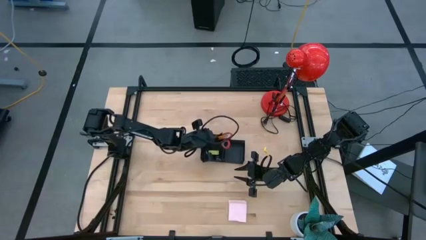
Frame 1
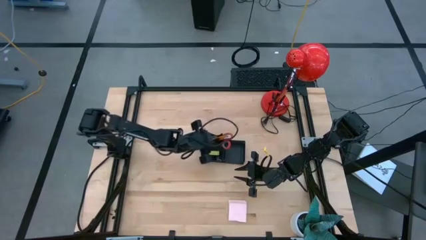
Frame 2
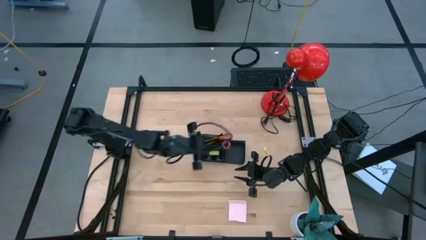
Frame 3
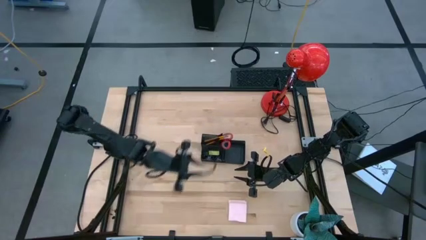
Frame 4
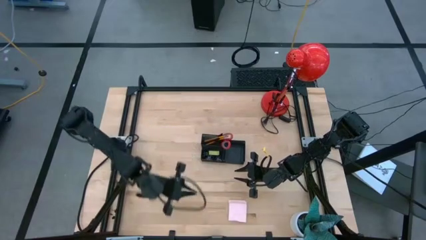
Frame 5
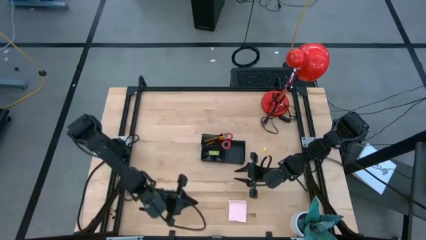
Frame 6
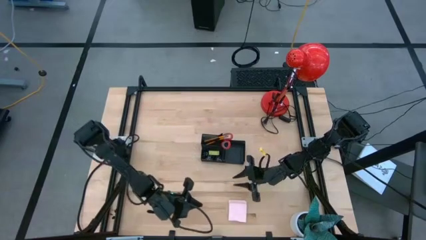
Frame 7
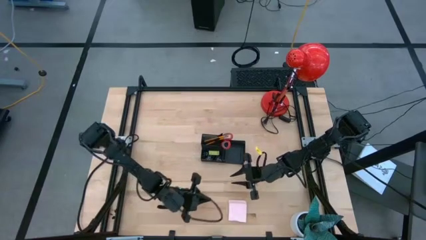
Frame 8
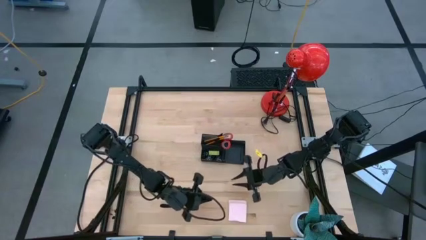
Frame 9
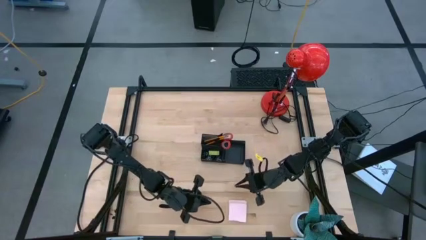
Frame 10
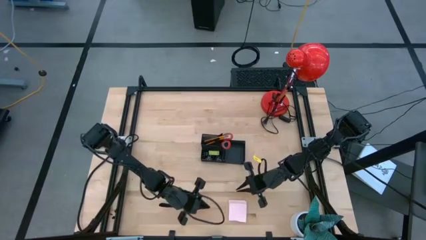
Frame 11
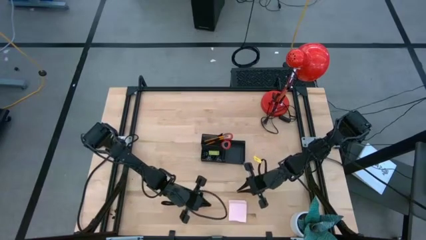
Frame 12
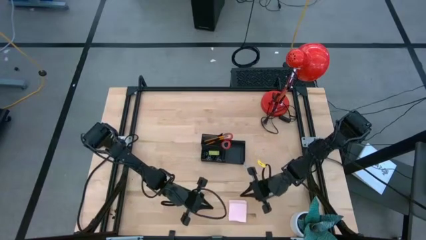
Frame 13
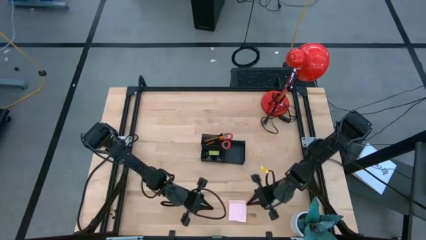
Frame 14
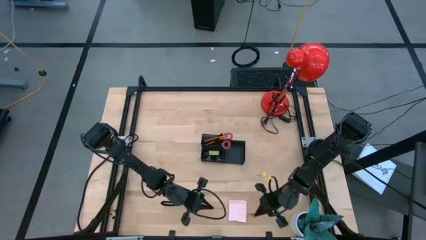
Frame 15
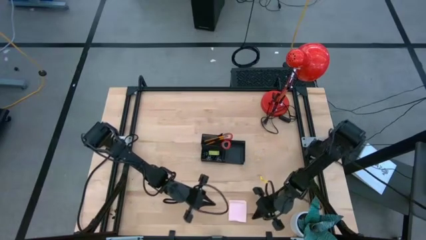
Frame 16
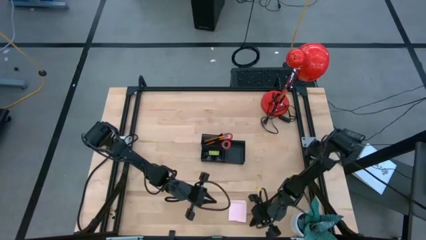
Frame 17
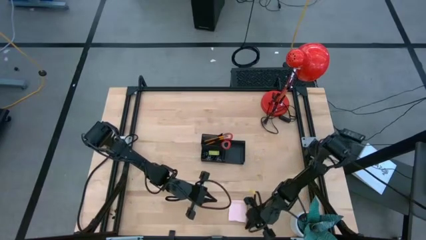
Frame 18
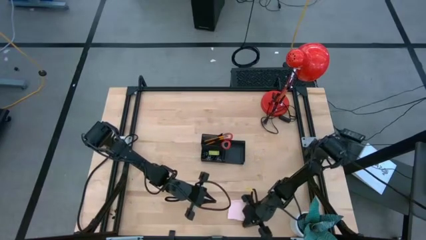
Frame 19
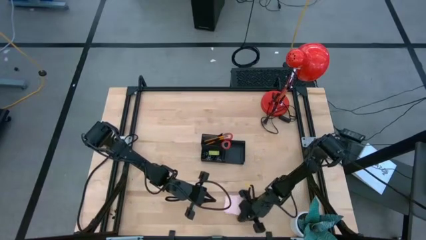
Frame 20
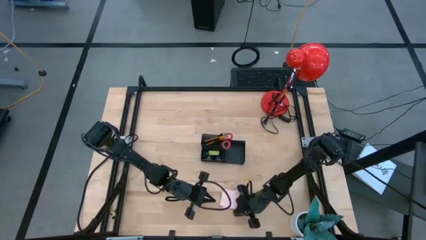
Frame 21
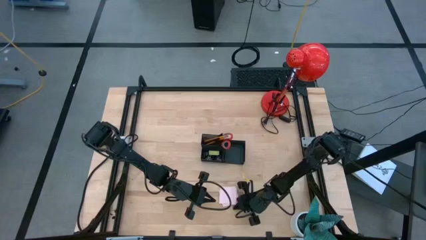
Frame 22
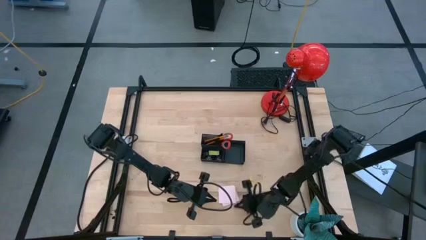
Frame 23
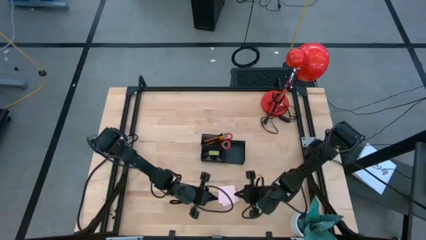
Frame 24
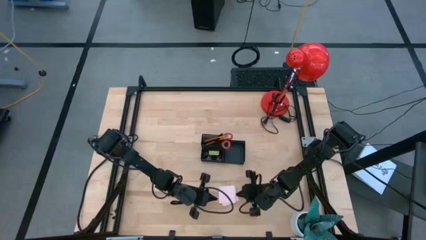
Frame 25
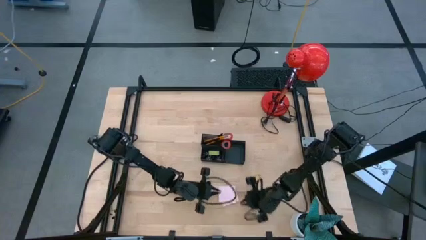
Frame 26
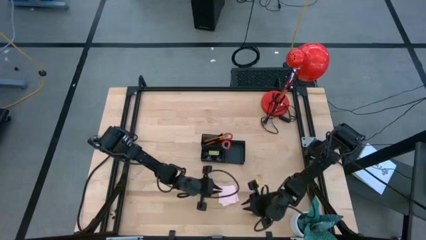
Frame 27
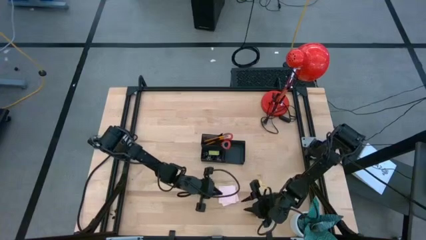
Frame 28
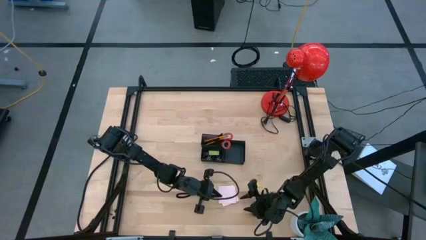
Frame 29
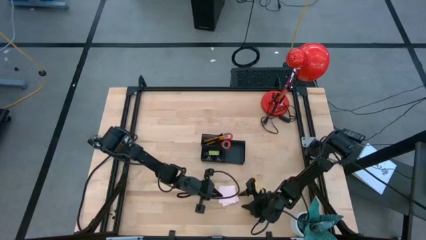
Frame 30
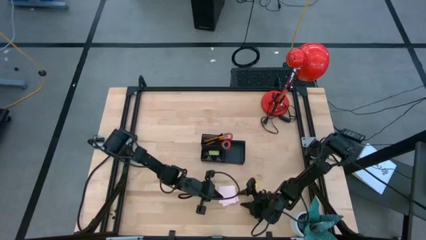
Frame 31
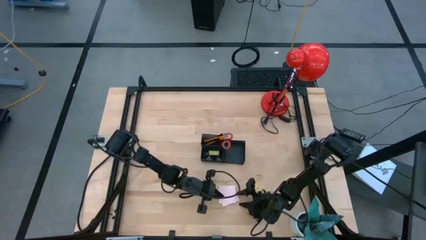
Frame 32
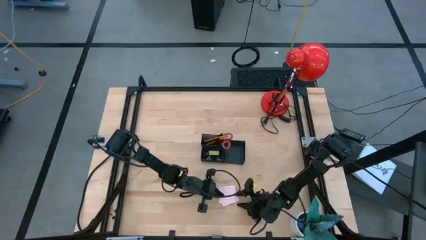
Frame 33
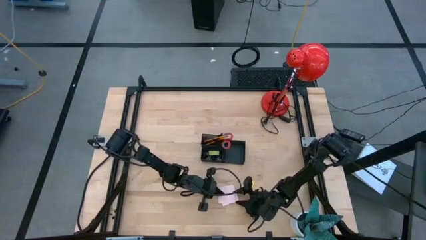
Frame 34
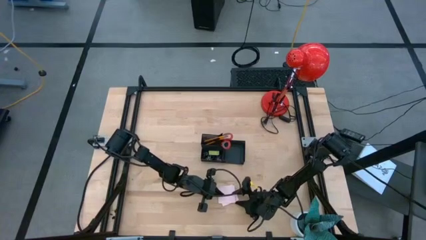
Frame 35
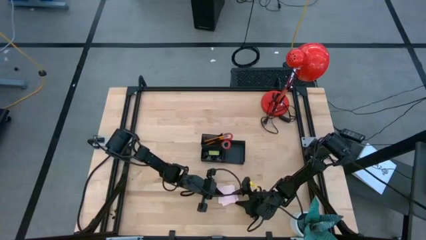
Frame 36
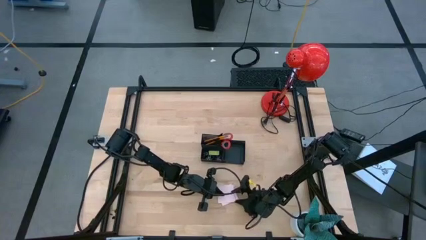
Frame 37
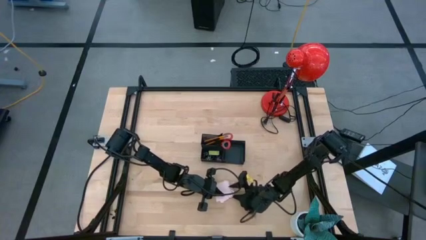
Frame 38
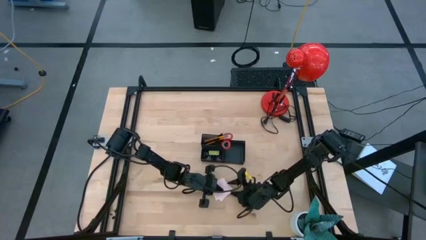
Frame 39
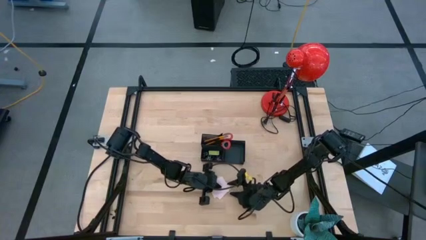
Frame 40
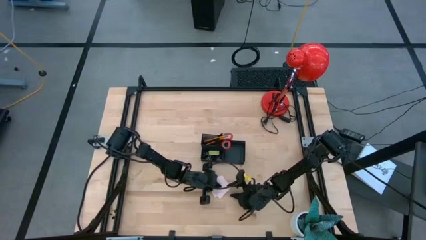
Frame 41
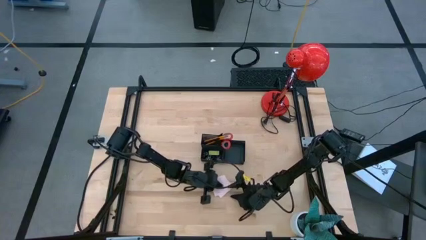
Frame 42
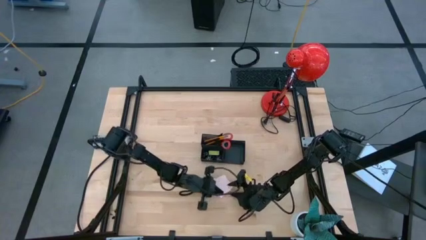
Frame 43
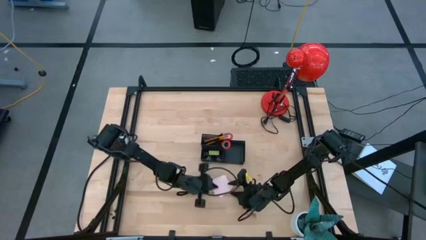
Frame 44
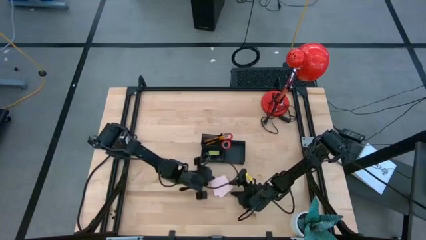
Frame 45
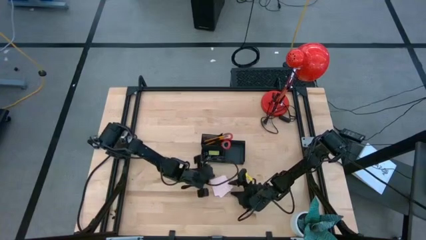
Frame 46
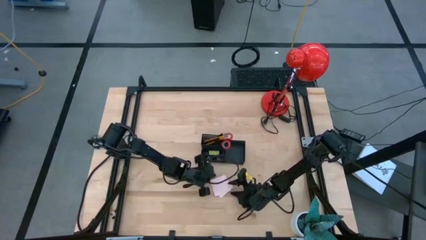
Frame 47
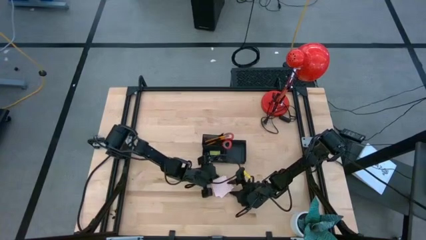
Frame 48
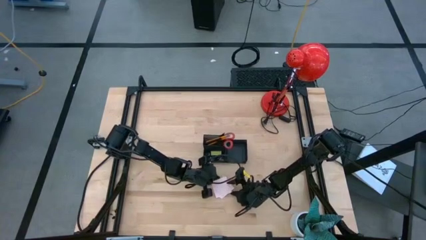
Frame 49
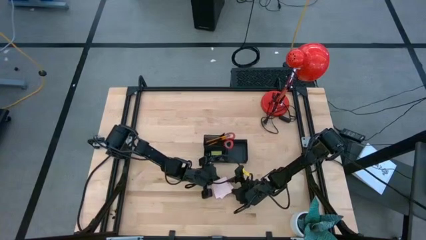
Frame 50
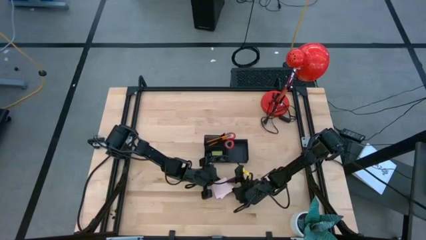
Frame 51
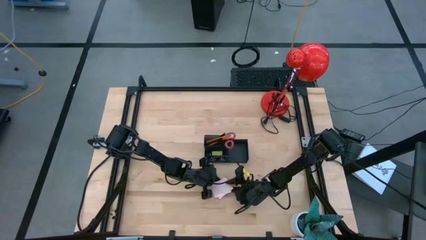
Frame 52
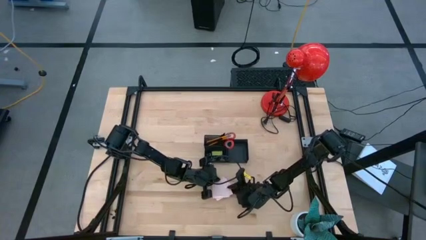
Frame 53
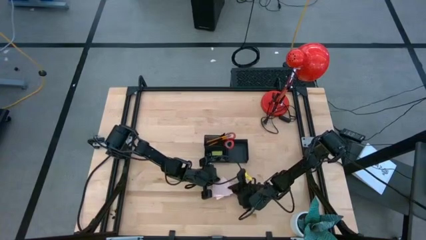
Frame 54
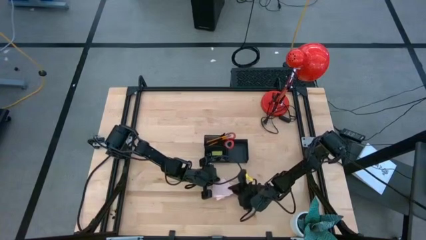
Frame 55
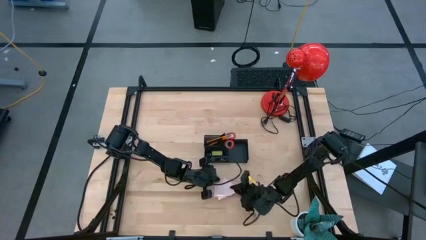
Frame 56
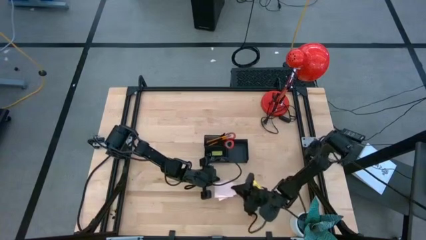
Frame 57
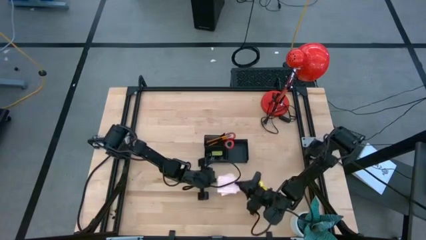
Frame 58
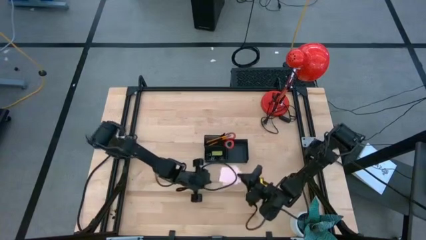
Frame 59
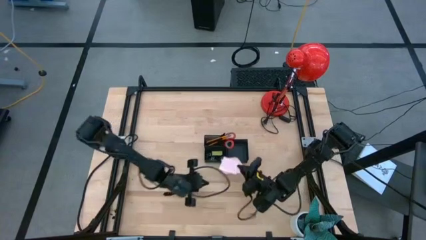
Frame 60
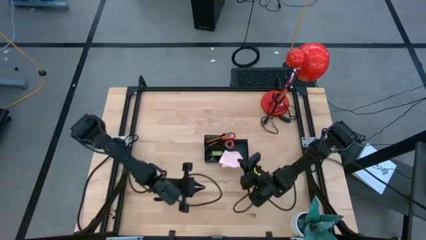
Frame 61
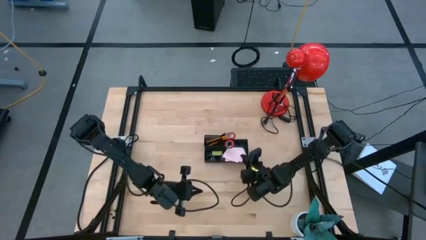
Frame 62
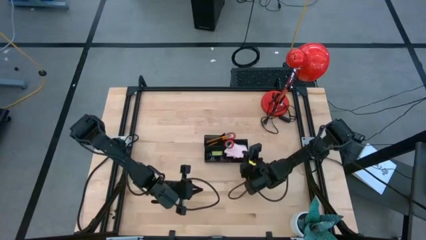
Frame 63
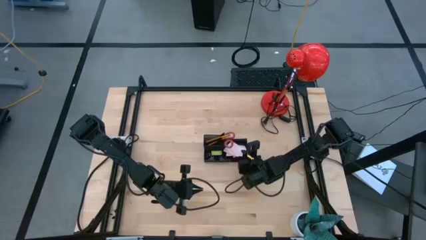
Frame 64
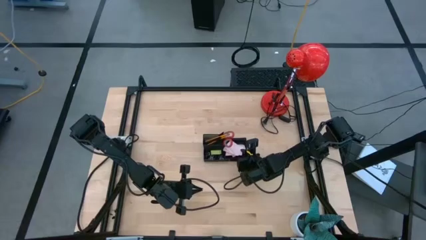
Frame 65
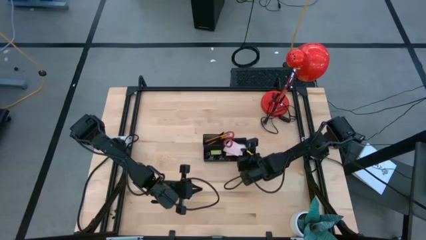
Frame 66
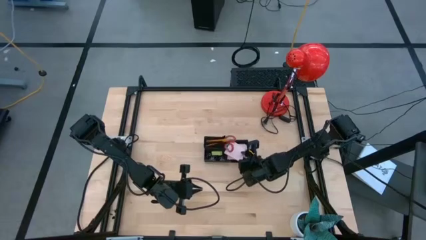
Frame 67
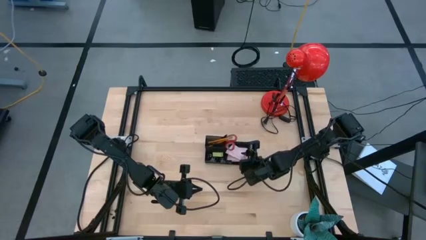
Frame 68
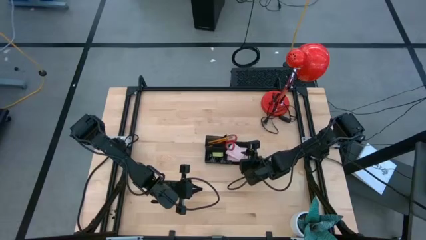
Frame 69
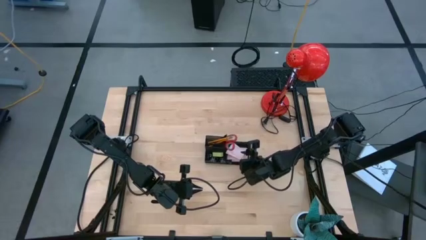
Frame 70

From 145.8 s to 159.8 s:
Task: Pick and place office supplies into organizer
Put the pink sticky notes into the black desk organizer

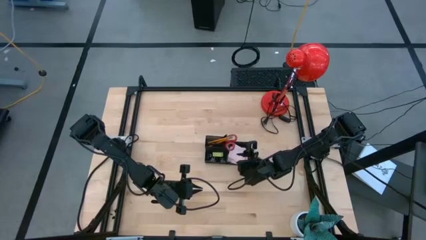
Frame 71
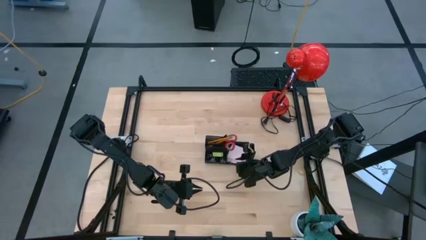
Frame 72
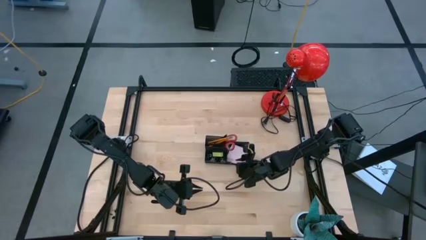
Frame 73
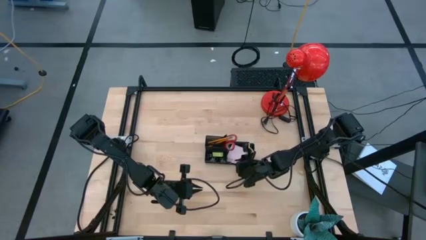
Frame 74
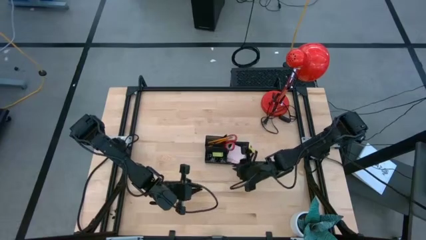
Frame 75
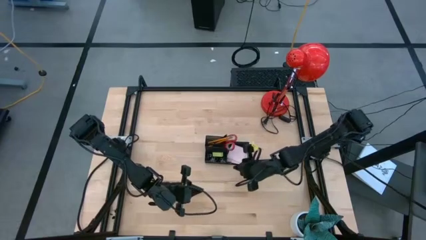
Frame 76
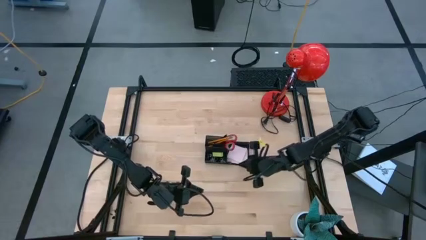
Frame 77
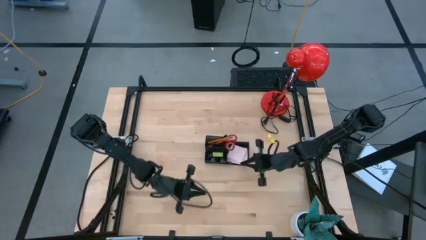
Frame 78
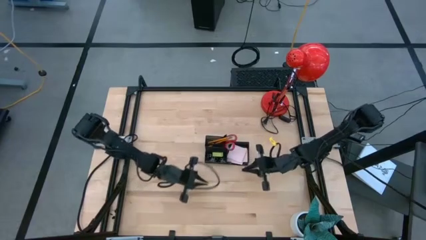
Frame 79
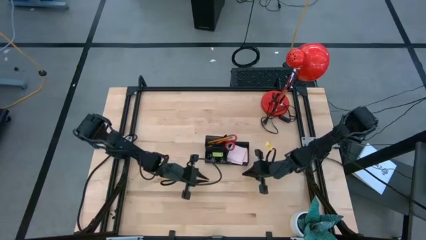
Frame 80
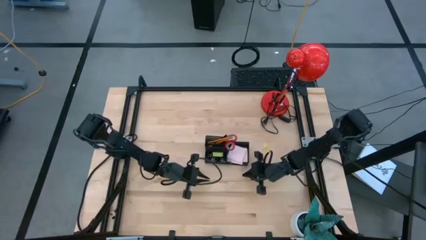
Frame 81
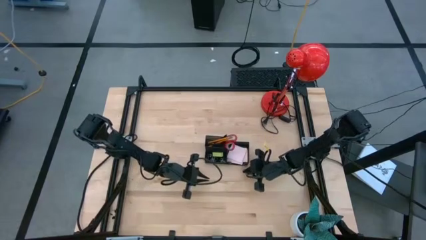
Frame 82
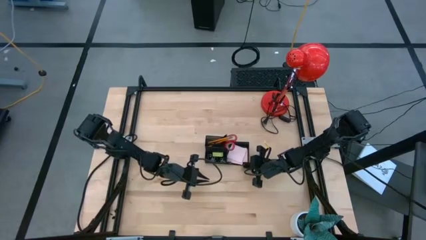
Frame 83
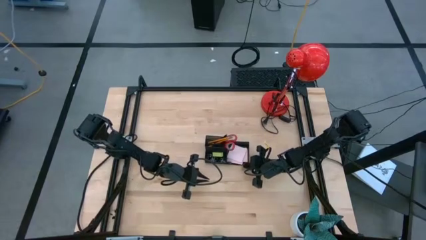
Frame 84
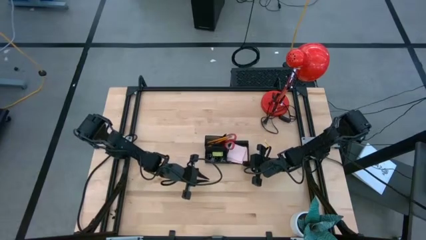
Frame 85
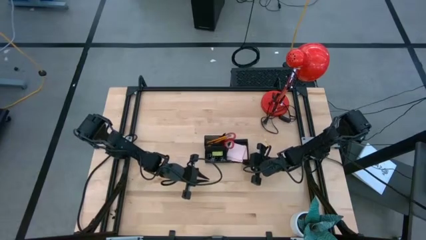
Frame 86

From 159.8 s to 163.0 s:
Adjust the black desk organizer
